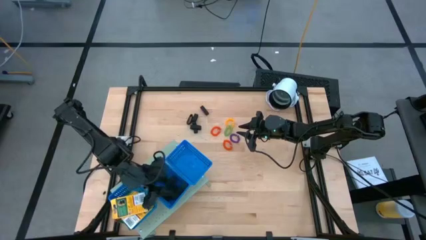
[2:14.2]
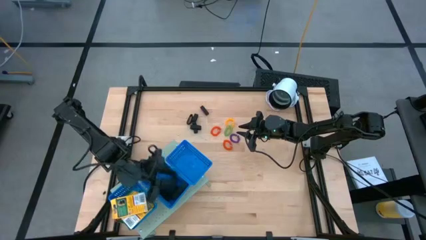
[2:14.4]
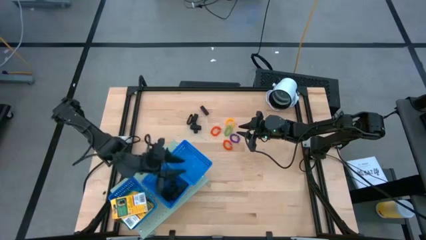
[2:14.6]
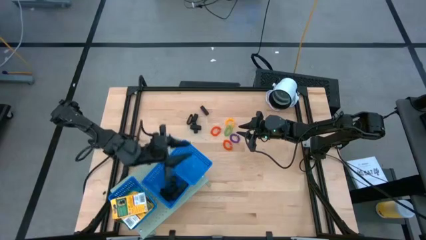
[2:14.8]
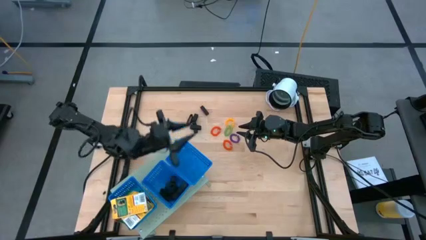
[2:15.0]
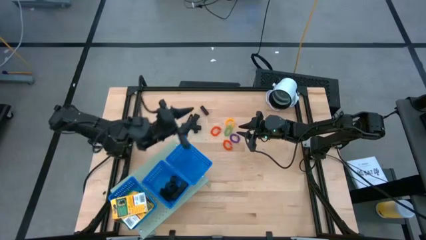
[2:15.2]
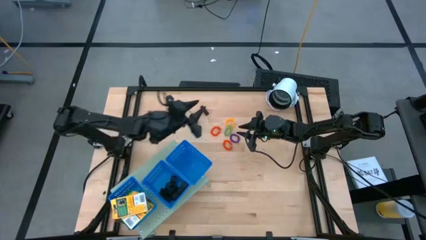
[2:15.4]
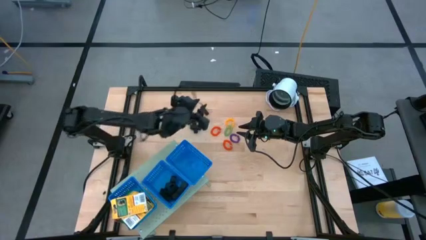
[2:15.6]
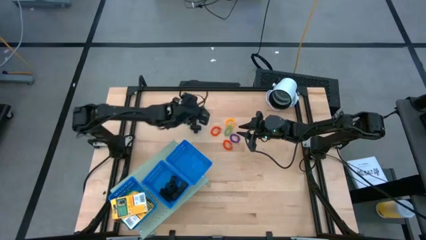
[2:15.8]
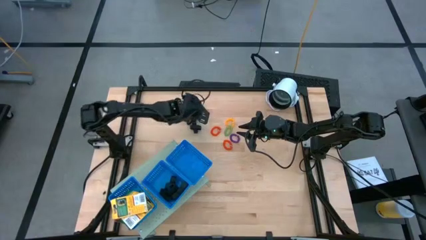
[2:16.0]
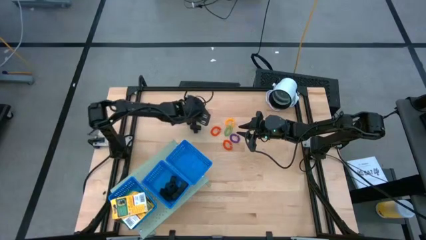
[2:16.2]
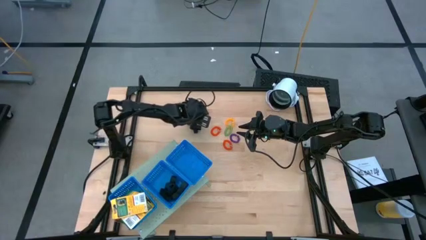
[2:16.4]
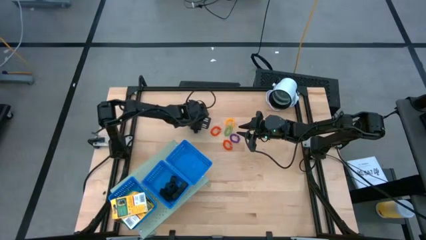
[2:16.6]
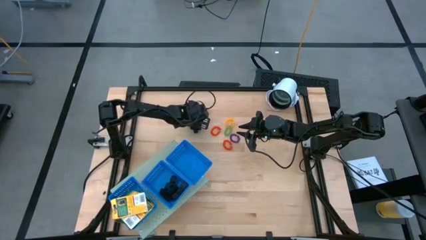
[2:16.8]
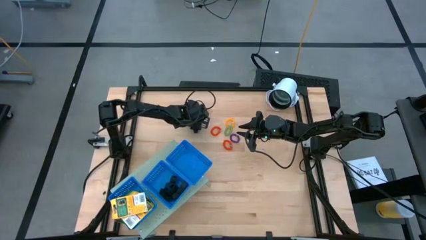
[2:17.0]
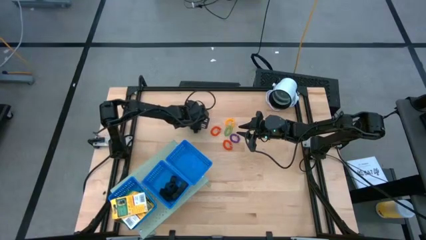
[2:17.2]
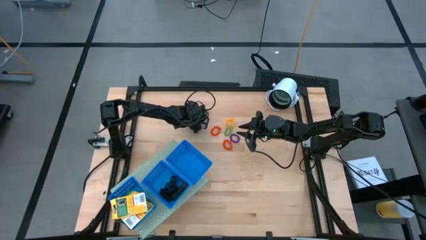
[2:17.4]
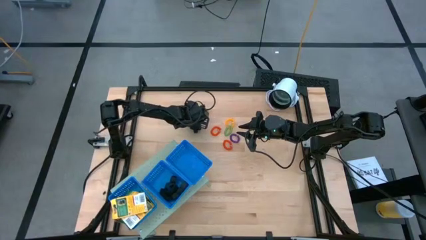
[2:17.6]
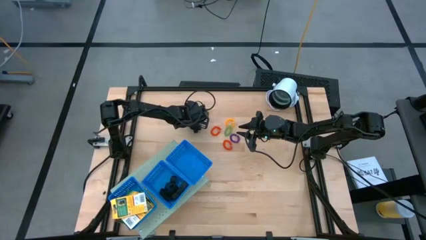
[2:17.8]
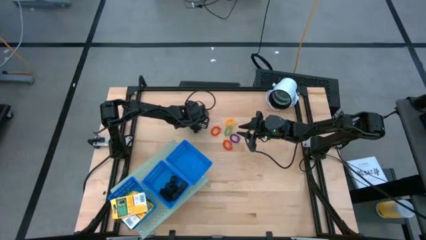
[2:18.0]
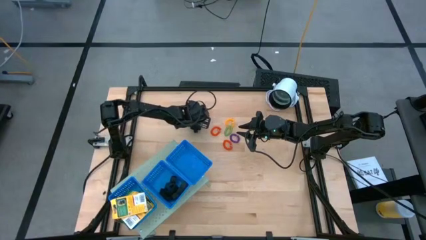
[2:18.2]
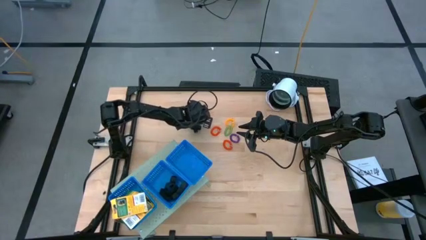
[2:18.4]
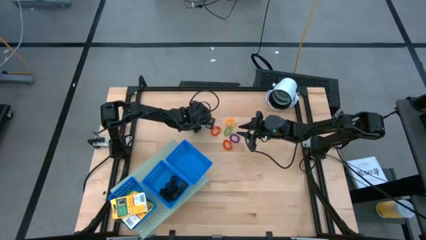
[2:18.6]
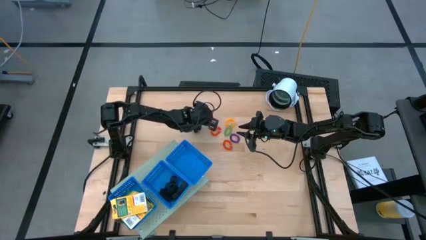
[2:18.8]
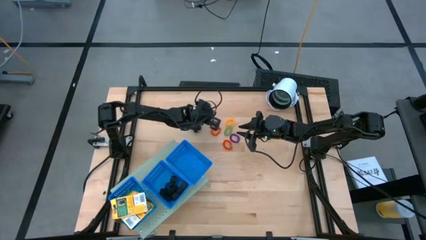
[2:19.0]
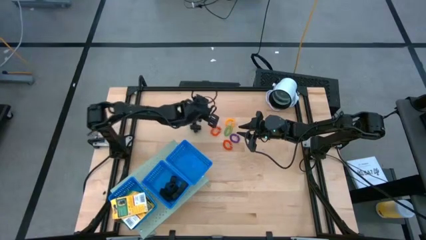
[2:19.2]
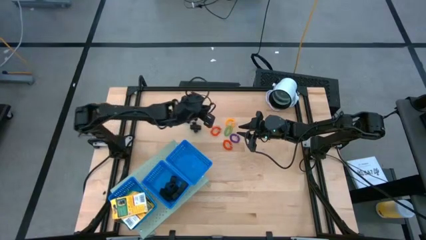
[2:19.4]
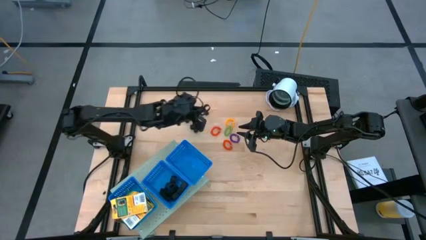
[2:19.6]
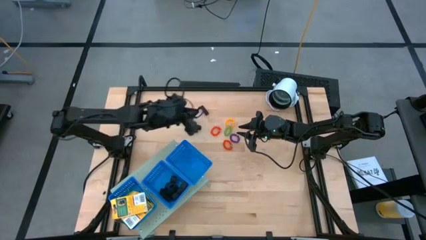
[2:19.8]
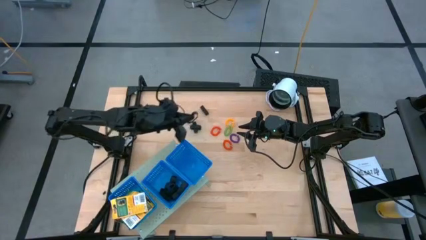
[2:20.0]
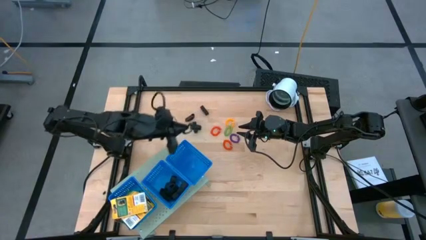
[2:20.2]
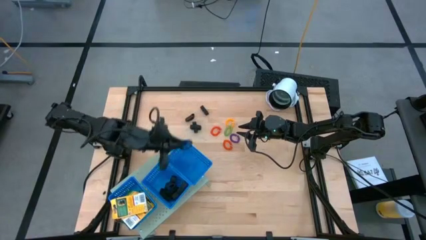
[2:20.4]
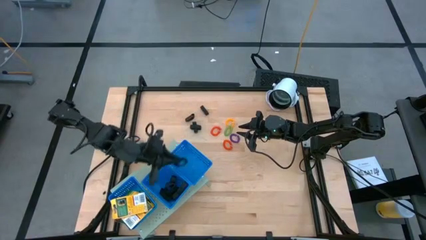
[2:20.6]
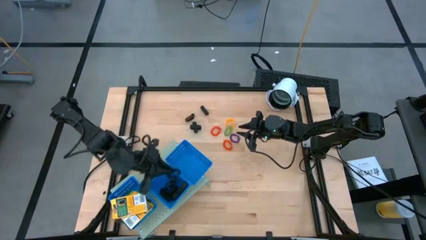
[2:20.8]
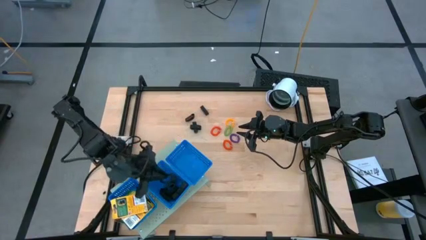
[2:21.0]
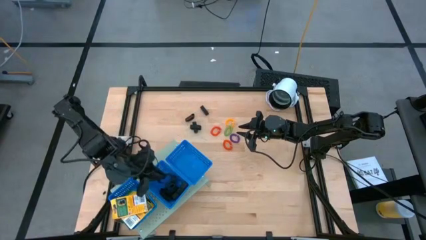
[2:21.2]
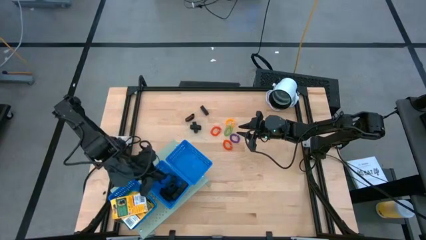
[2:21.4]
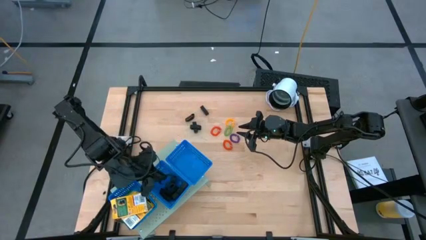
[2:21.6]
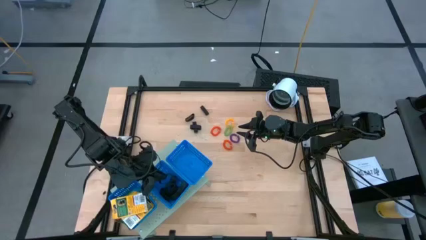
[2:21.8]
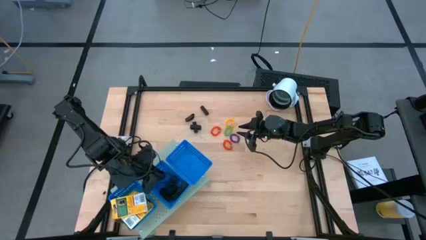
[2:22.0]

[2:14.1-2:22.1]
Task: Pick & Place Office Desk Supplies
Put the black rubber band into the center blue basket on the shelf

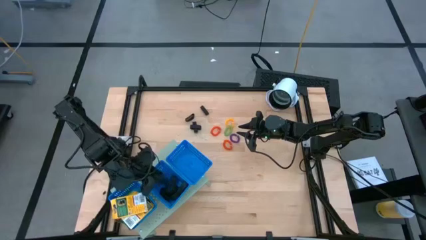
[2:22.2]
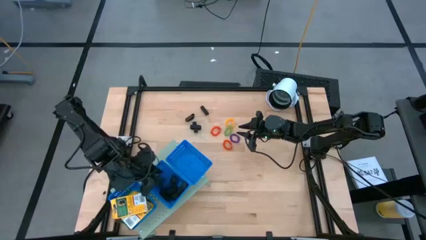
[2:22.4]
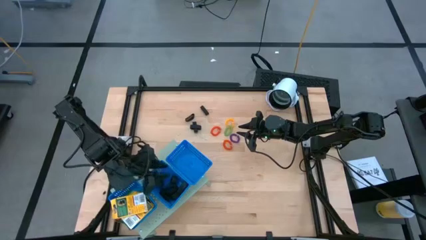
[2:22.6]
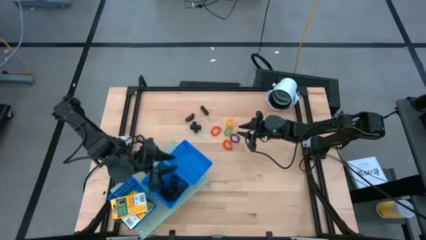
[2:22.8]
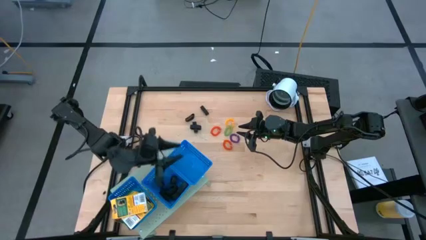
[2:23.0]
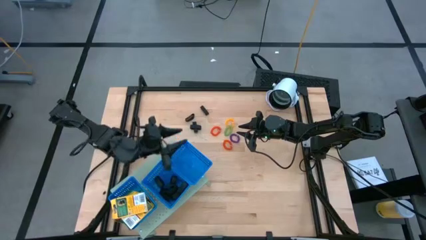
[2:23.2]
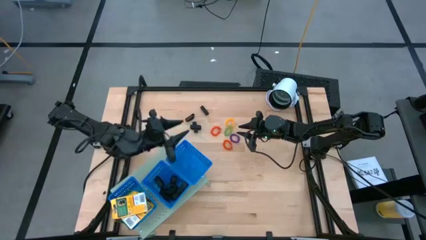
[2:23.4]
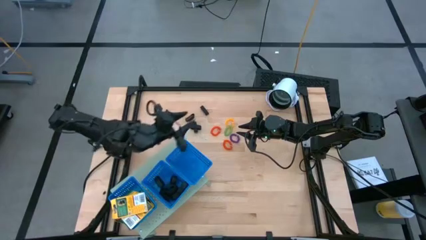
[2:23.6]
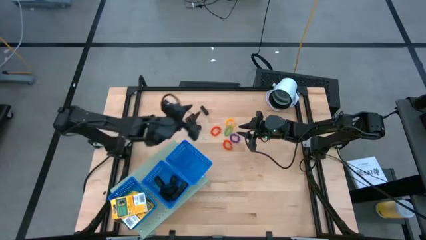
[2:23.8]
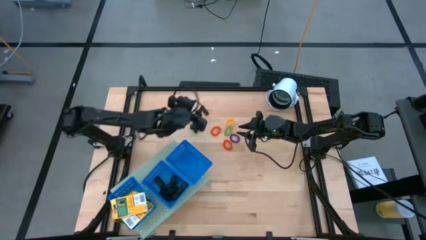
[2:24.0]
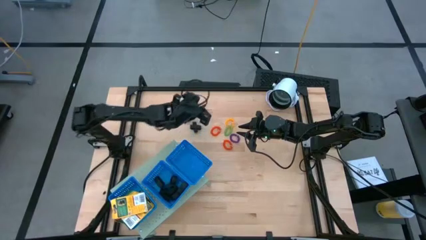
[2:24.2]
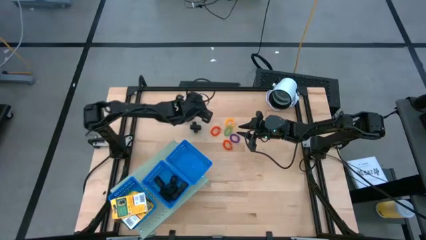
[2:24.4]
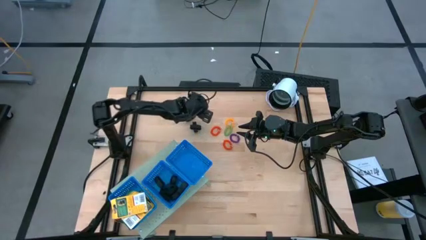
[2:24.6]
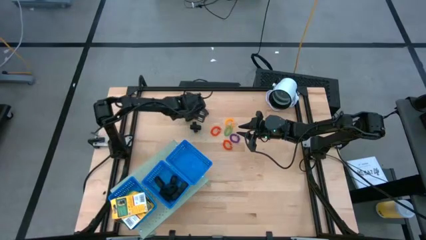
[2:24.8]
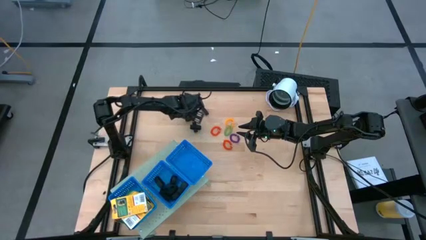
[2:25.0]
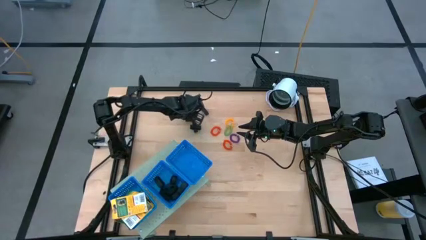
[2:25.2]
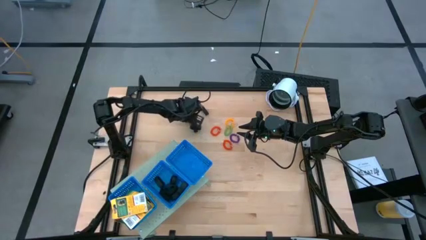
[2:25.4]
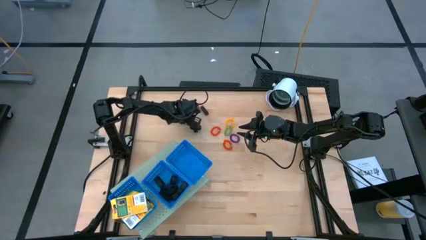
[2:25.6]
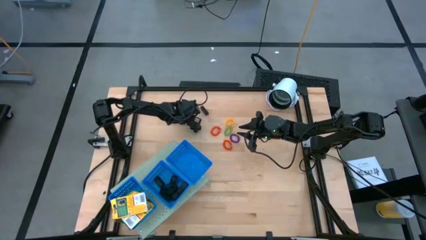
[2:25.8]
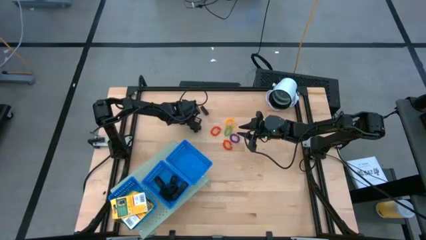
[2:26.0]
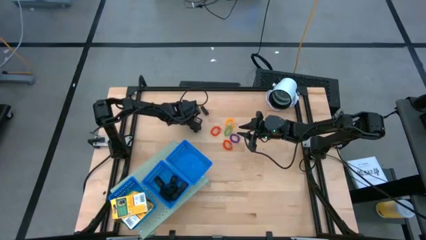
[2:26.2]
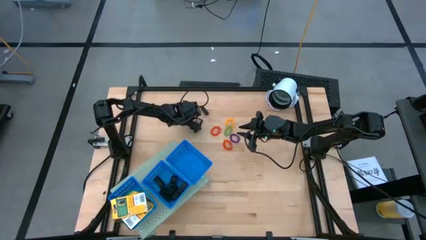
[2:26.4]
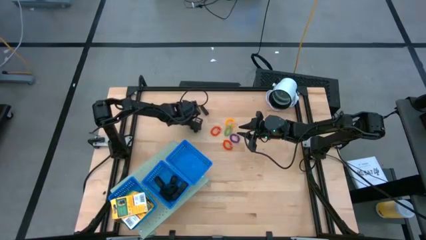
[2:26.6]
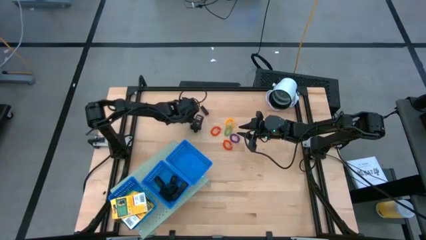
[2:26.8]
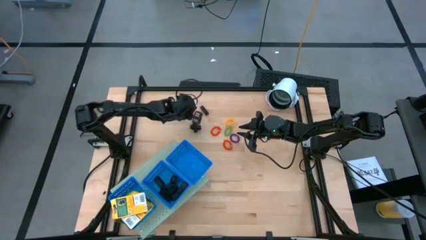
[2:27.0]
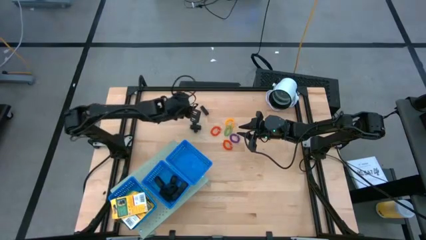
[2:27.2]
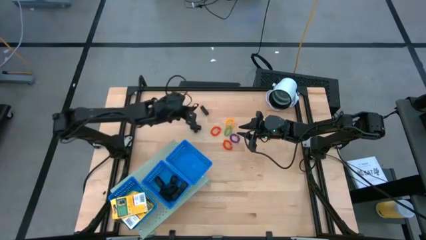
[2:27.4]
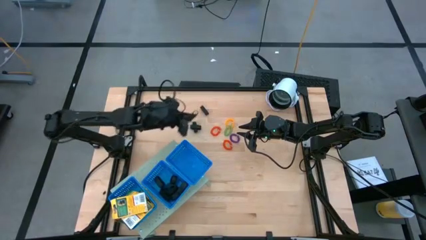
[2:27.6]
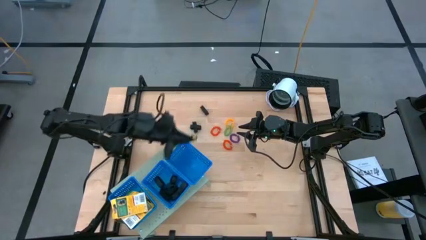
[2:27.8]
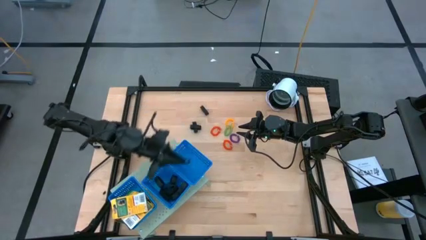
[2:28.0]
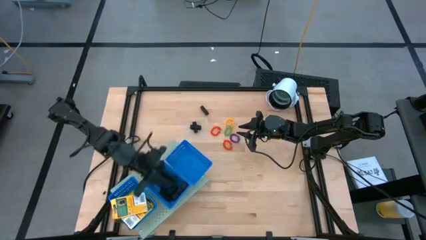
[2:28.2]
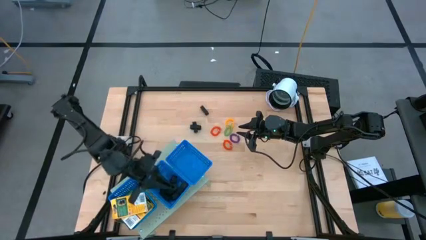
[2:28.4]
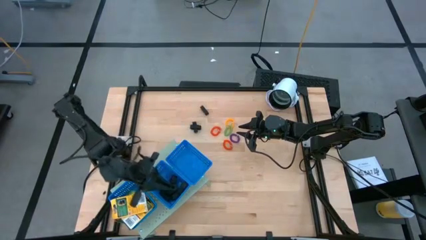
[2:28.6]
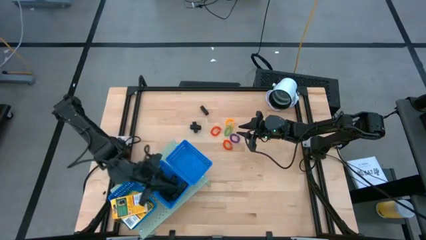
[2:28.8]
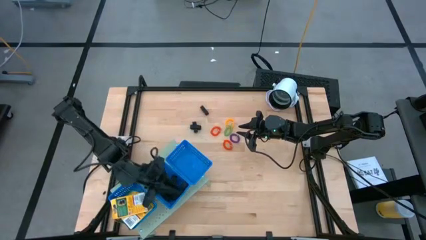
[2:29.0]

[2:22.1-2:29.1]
Put the black rubber band into the center blue basket on the shelf

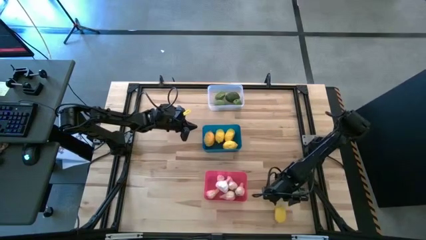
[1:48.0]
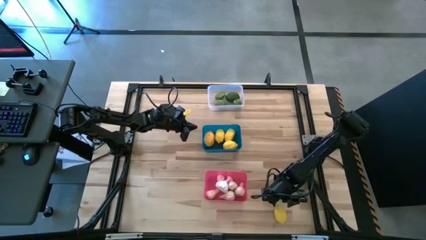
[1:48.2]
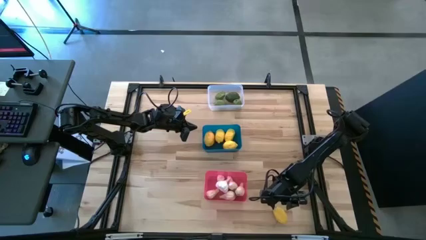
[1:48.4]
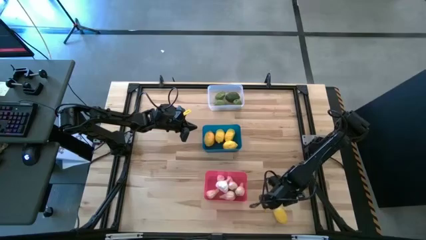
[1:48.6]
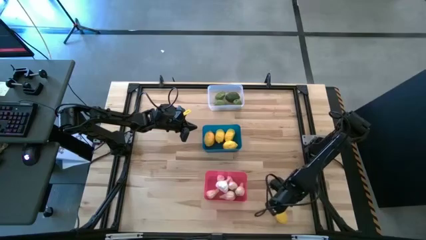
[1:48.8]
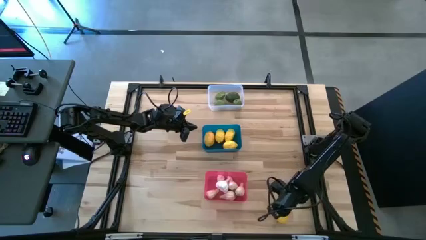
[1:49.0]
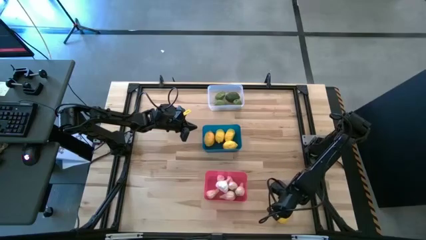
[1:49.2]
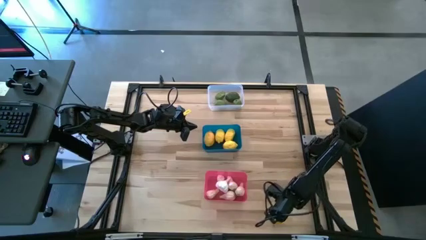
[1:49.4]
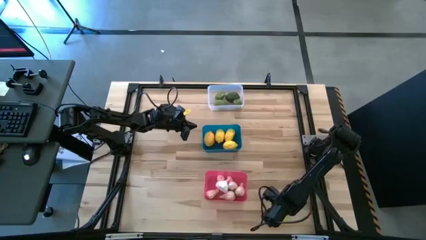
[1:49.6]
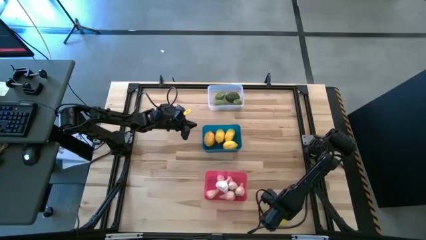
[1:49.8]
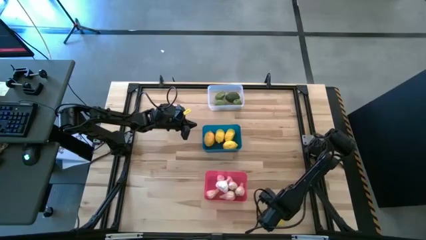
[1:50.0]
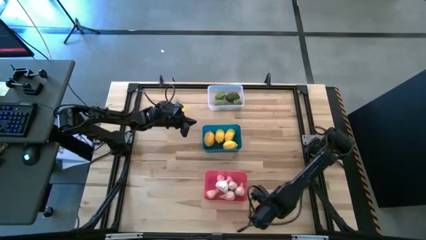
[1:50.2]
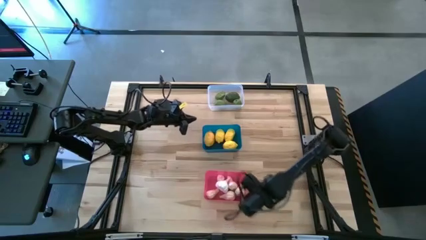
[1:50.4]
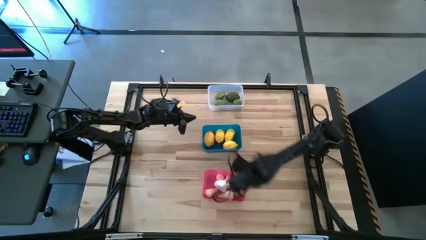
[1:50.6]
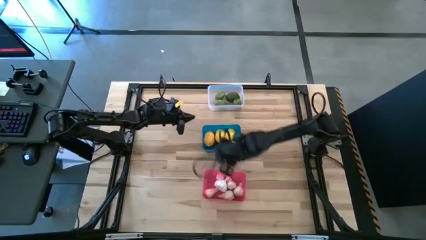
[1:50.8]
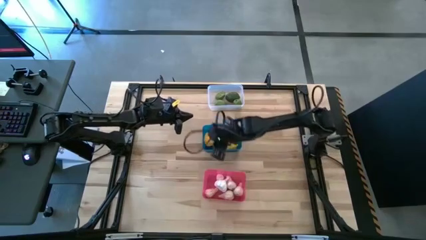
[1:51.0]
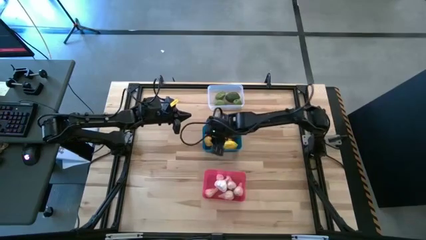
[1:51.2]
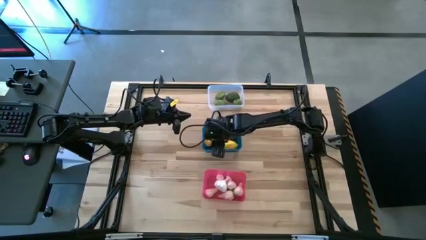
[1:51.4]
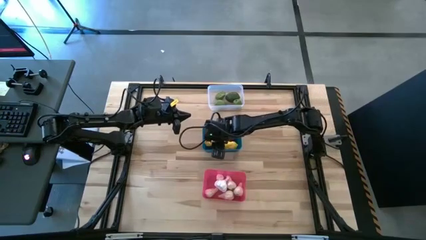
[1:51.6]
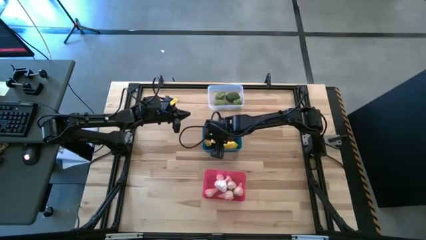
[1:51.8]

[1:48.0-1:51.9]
Task: Sort produce into baskets
Put the yellow lemon into the blue bin
